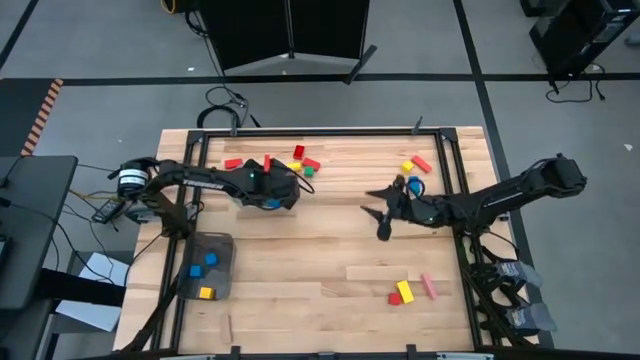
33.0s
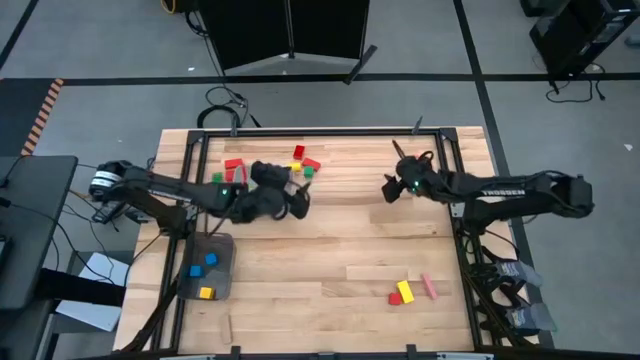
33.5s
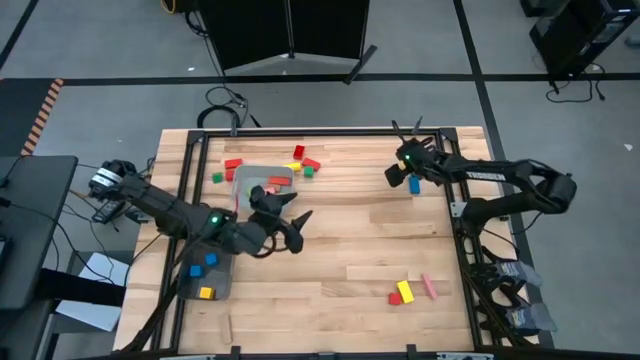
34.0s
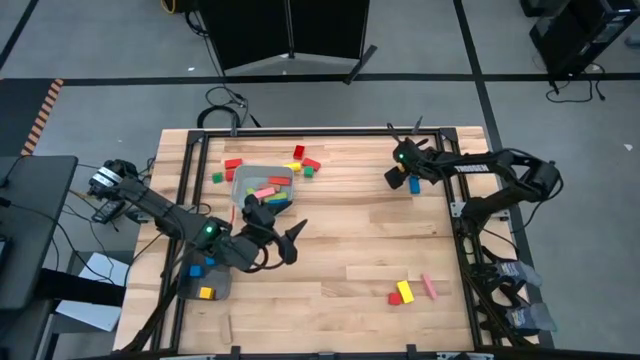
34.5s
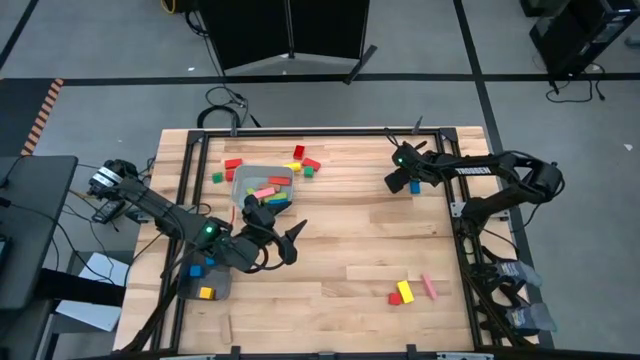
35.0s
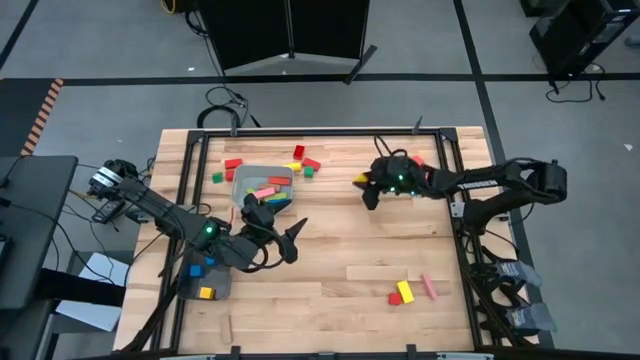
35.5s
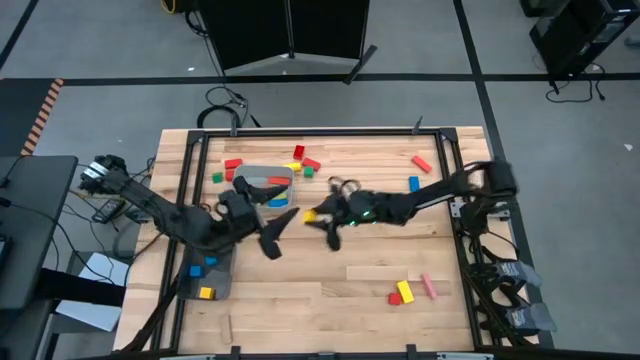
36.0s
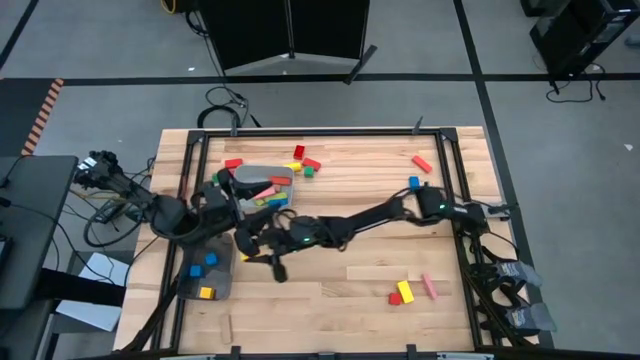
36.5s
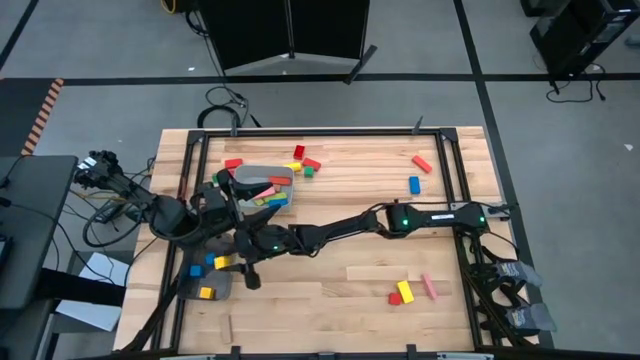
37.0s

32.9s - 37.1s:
Task: Sort blocks by size
Put the yellow square block into the black bin

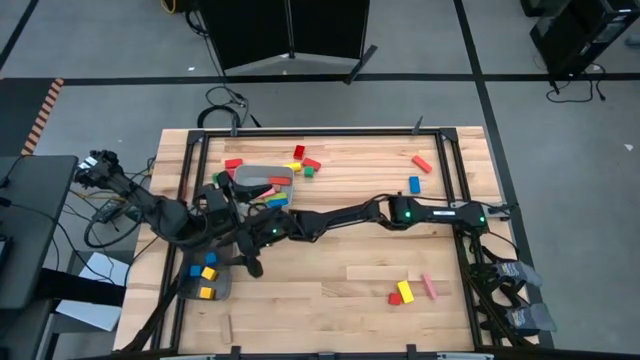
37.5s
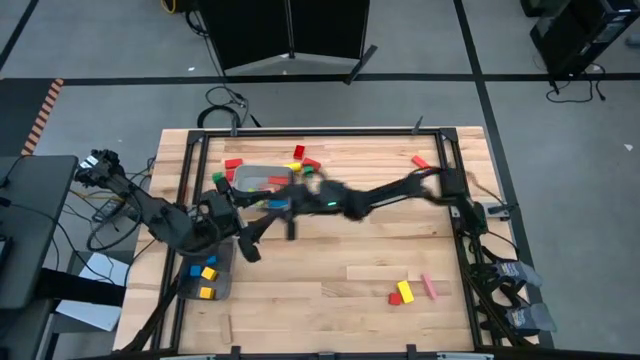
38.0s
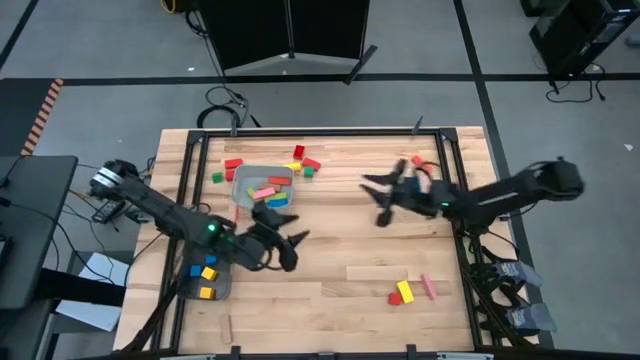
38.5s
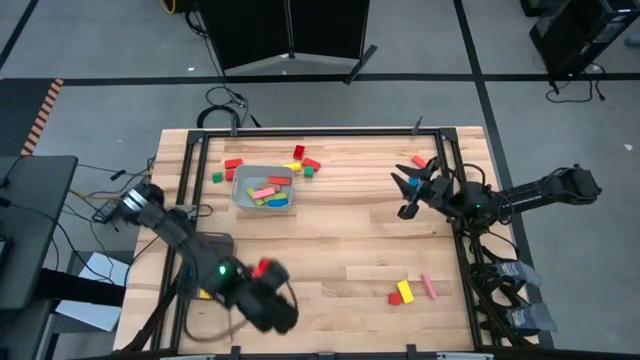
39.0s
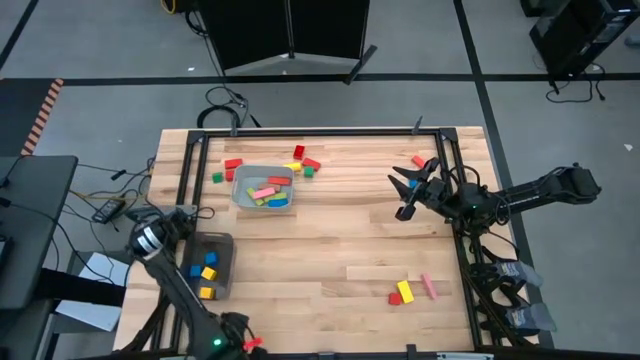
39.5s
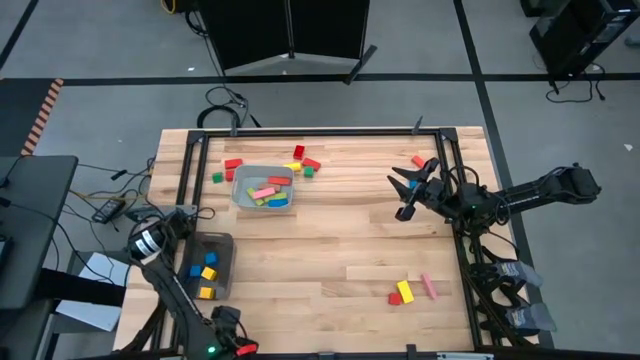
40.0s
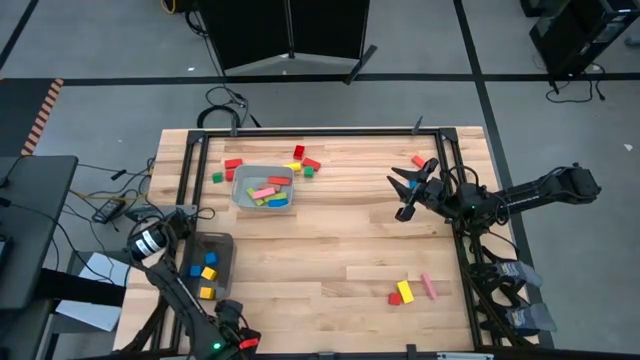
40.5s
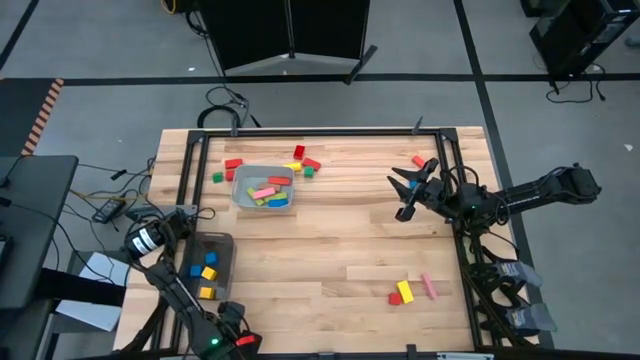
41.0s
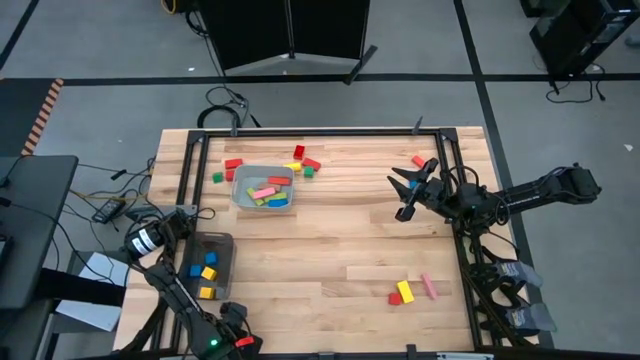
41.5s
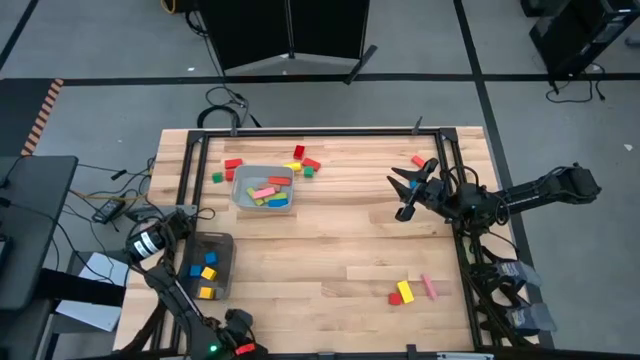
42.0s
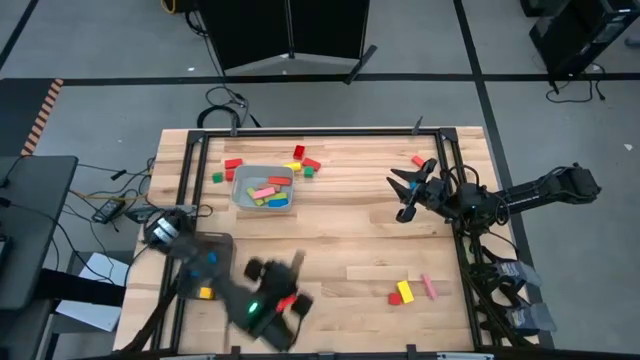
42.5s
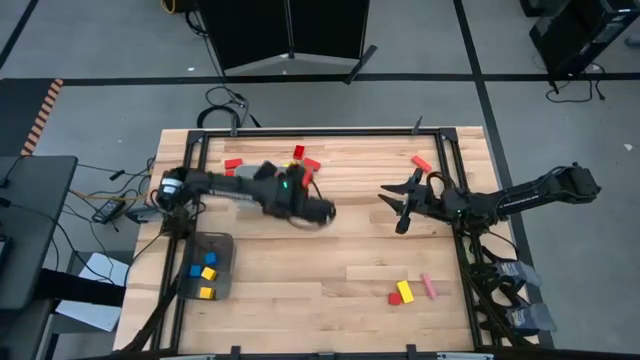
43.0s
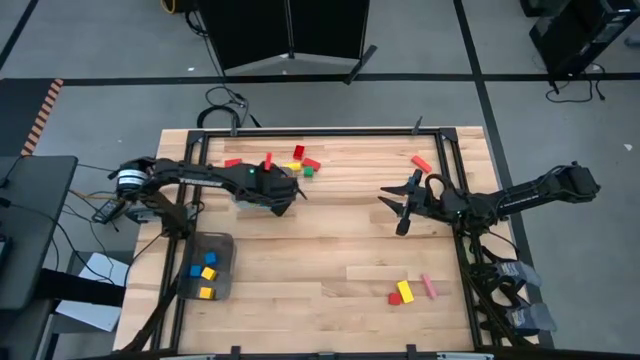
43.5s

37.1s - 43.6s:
Put the brown rectangular block into the gray bin

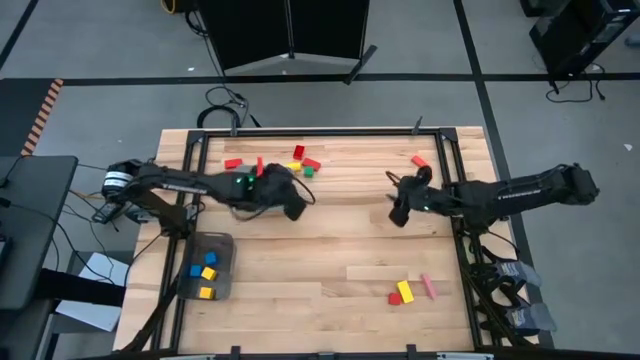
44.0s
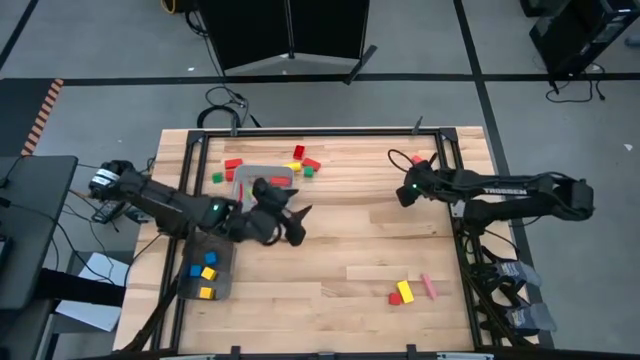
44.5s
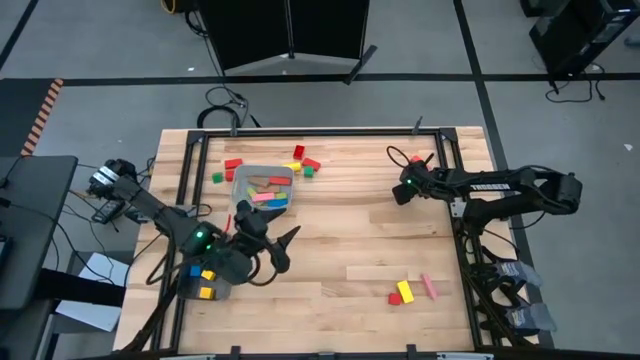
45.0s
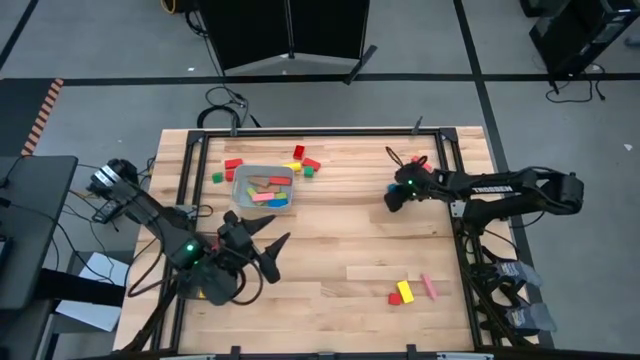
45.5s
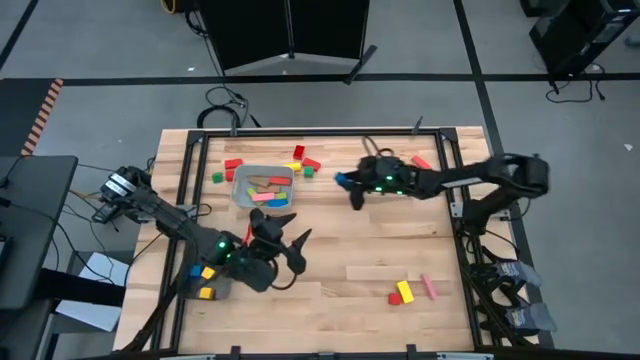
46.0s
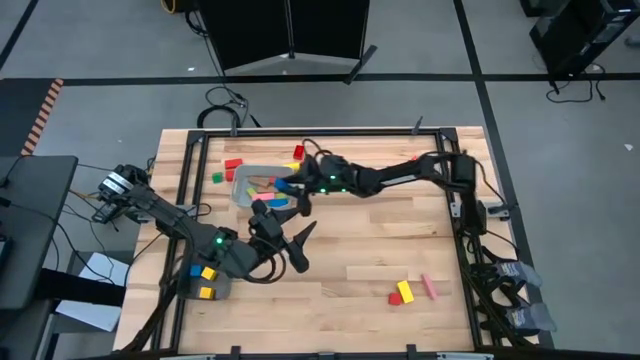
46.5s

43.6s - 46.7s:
Put the blue rectangular block into the gray bin

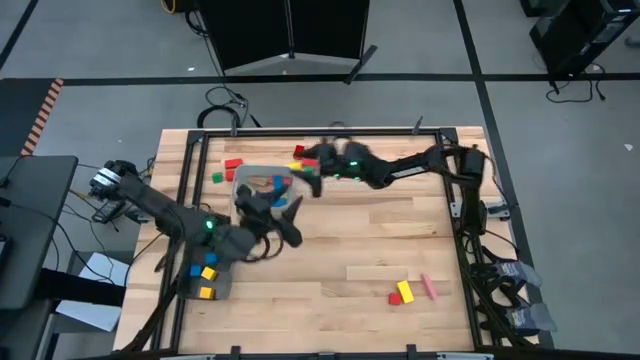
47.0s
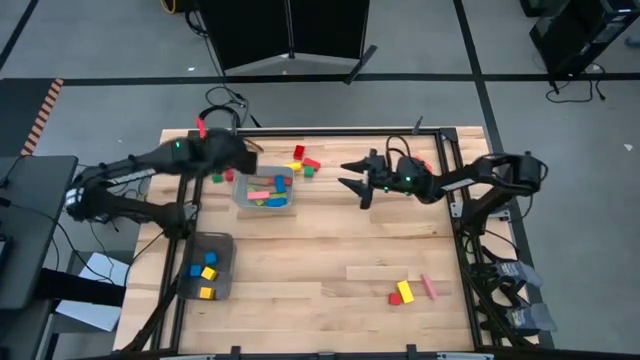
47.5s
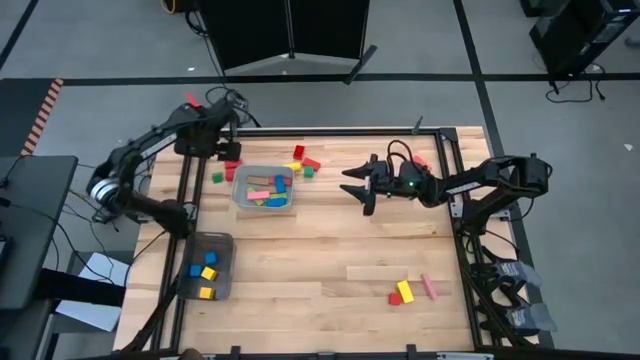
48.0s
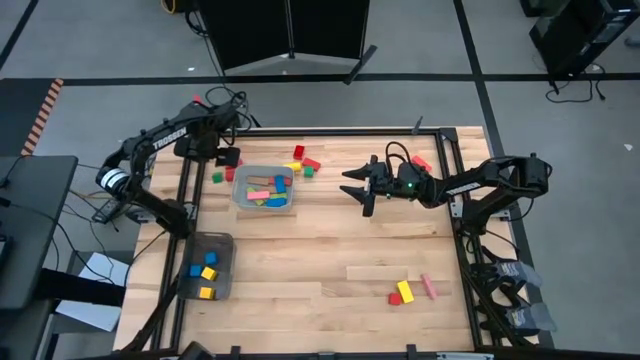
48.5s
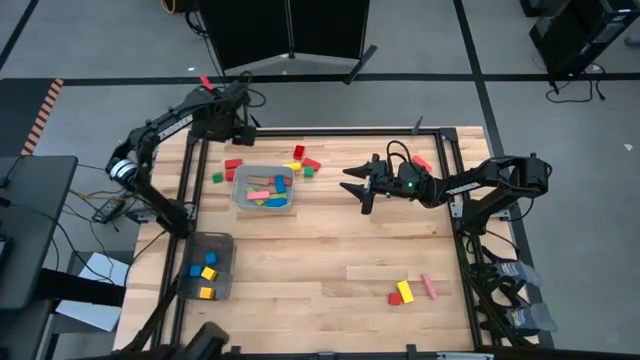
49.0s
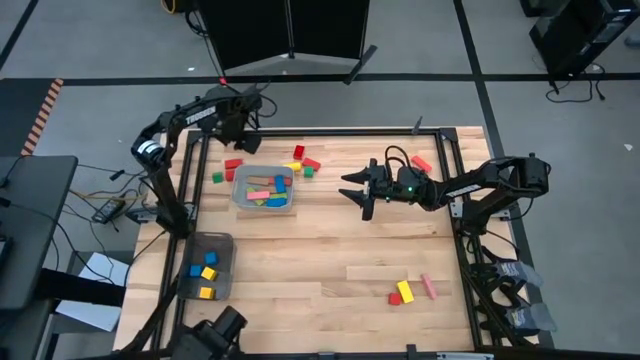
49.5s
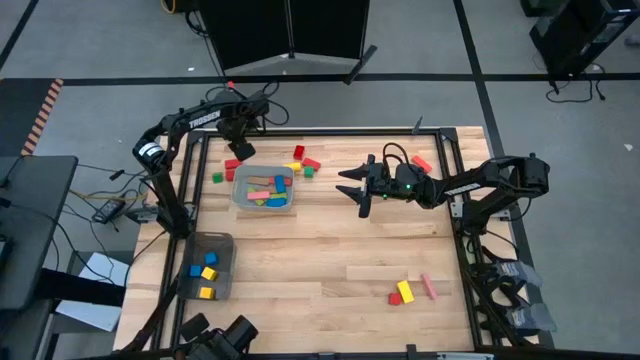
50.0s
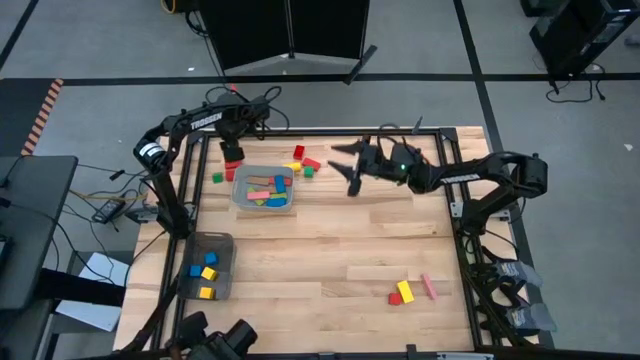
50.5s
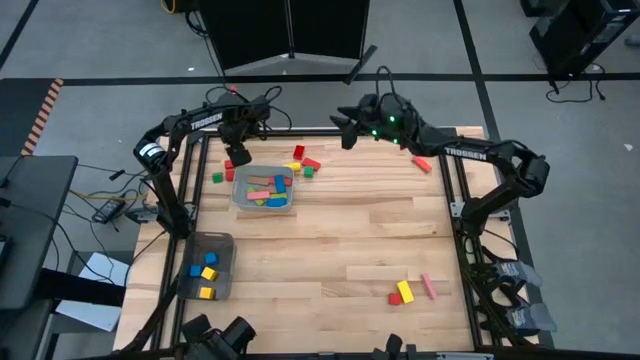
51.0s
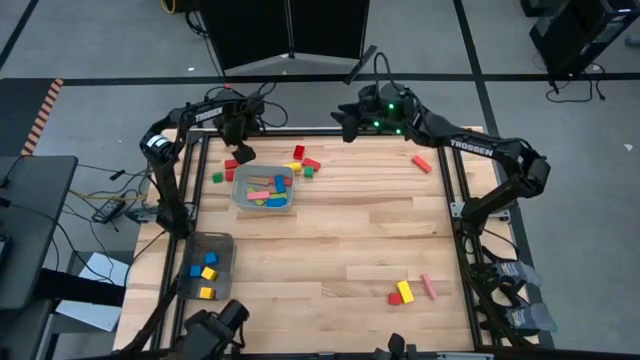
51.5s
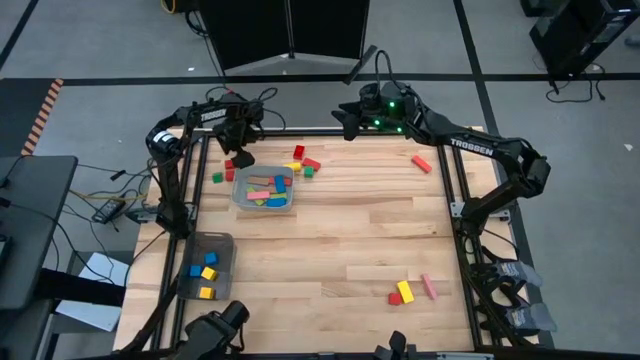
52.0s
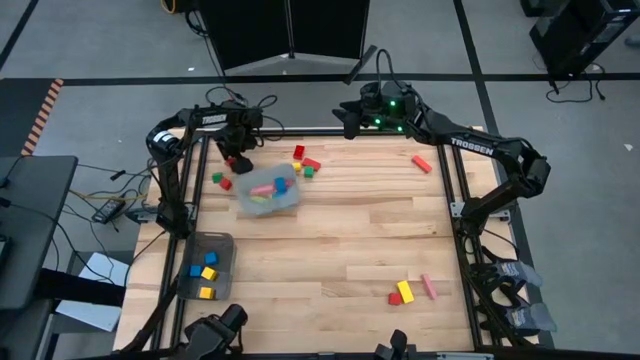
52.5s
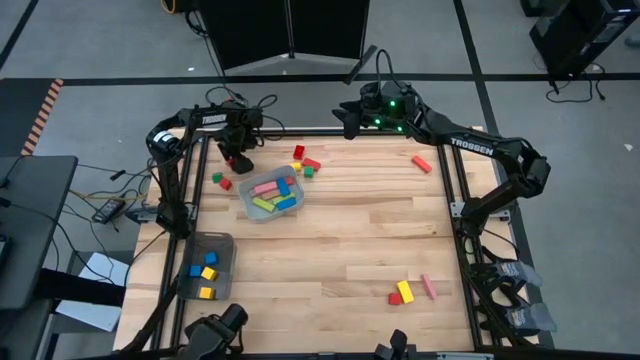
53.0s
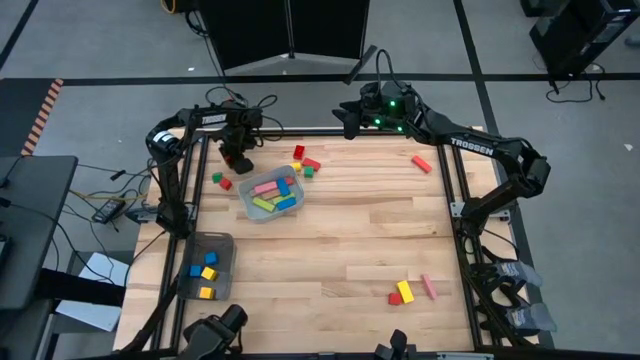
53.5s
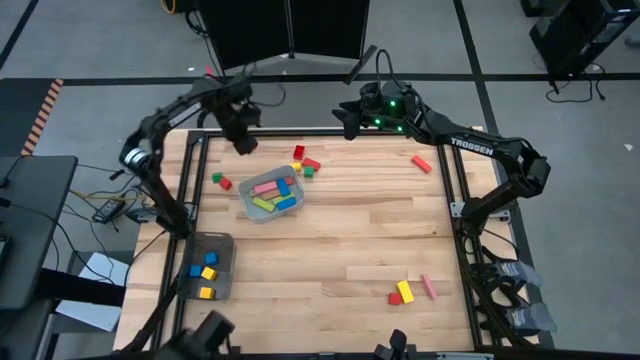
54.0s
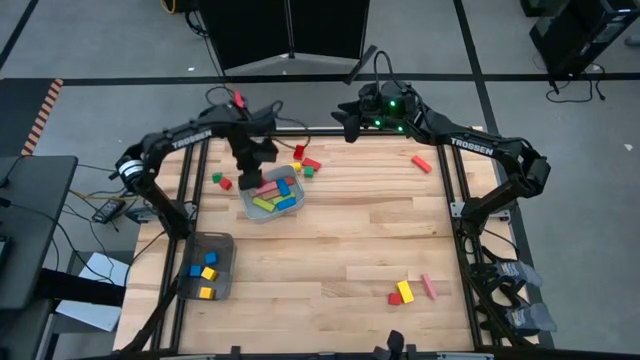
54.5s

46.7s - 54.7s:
Put the orange rectangular block into the gray bin
